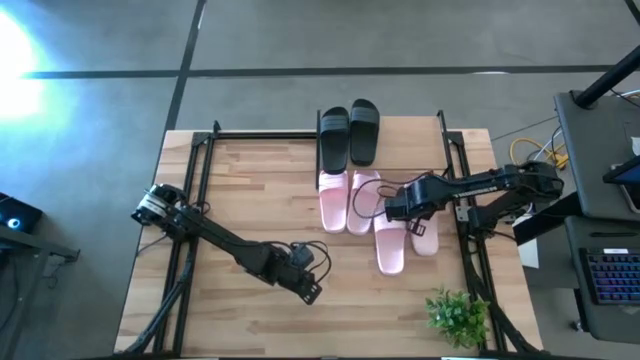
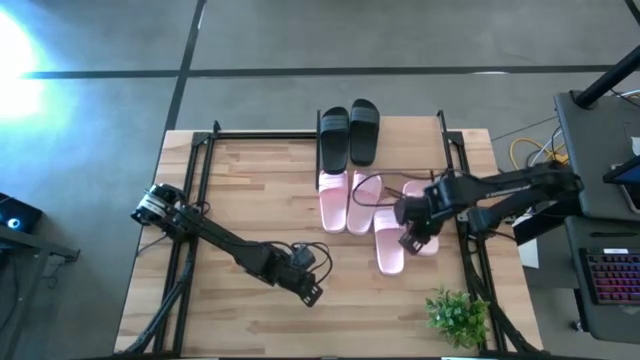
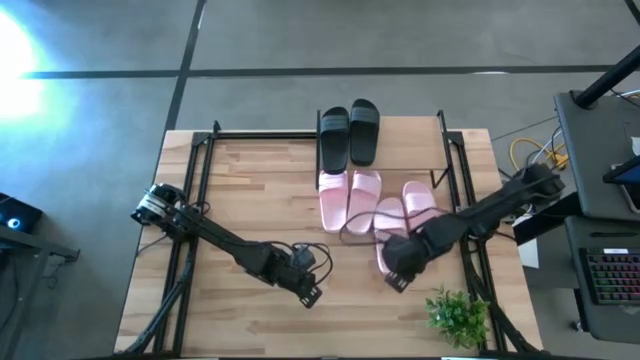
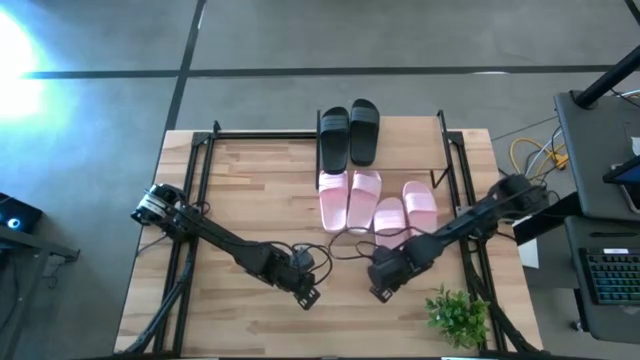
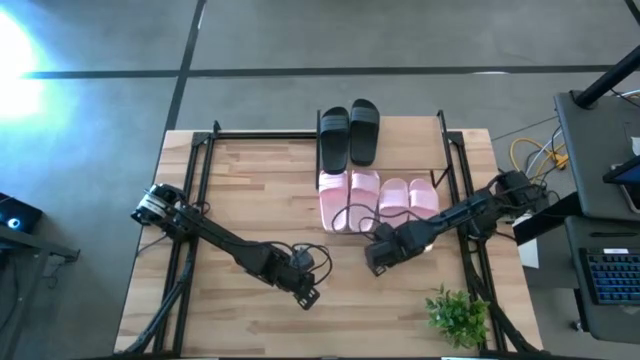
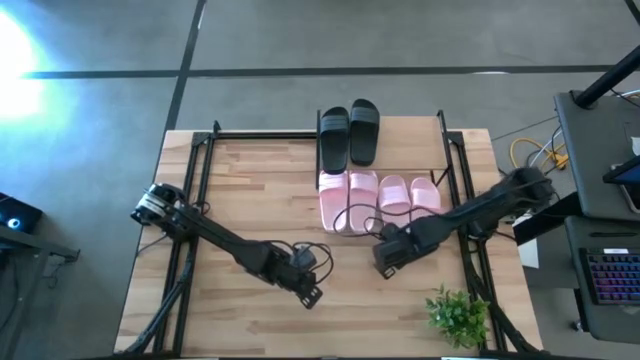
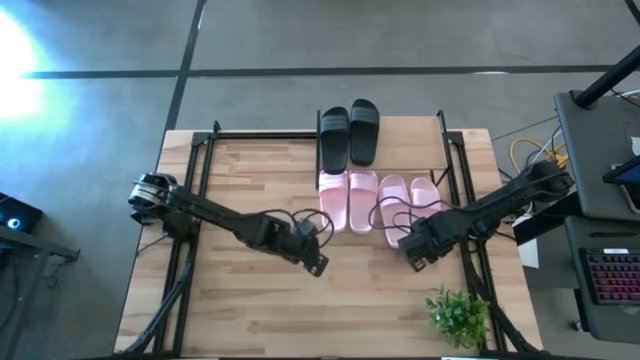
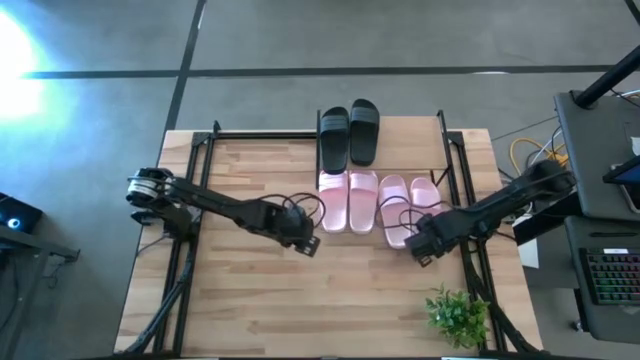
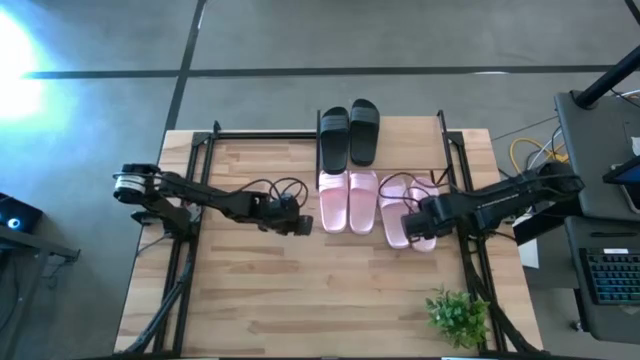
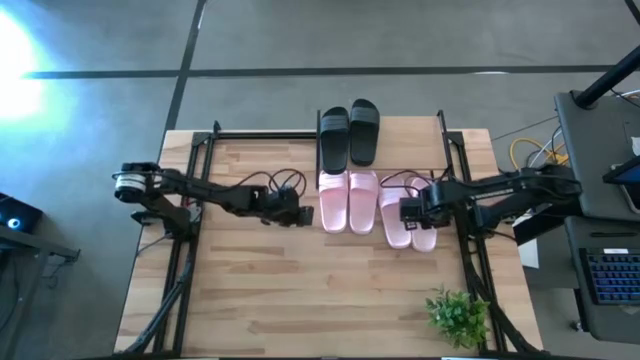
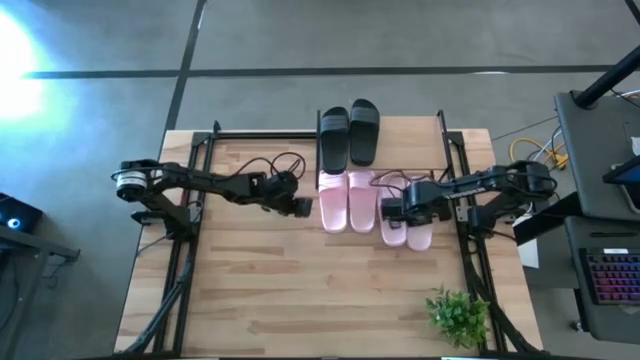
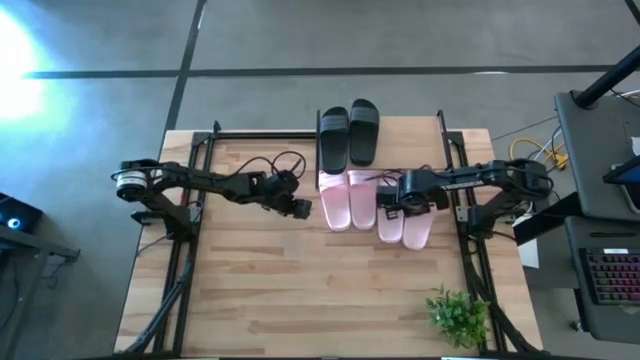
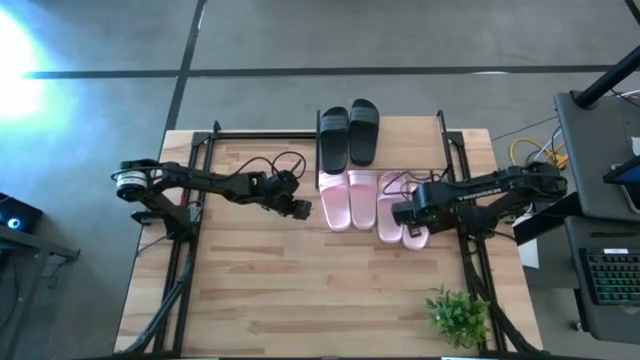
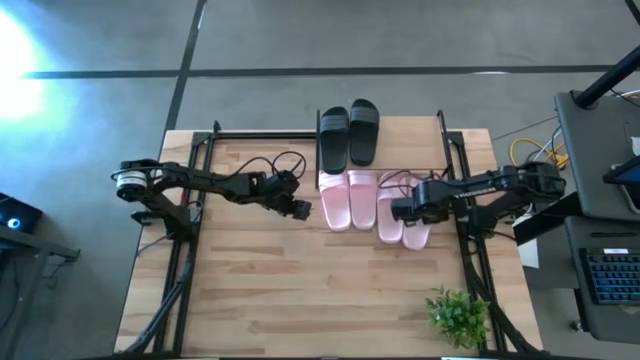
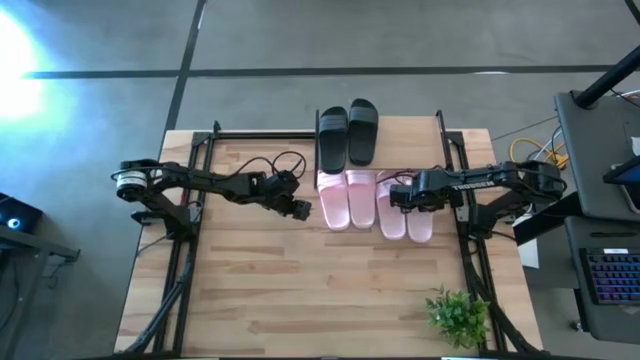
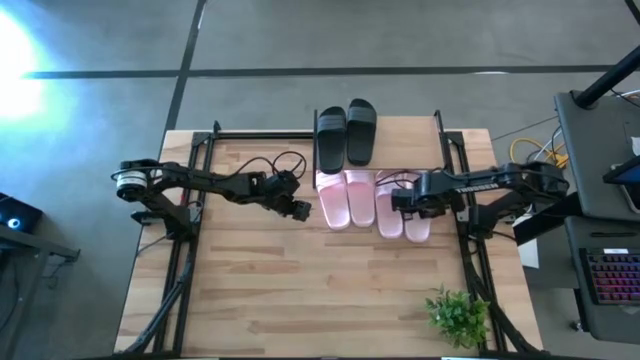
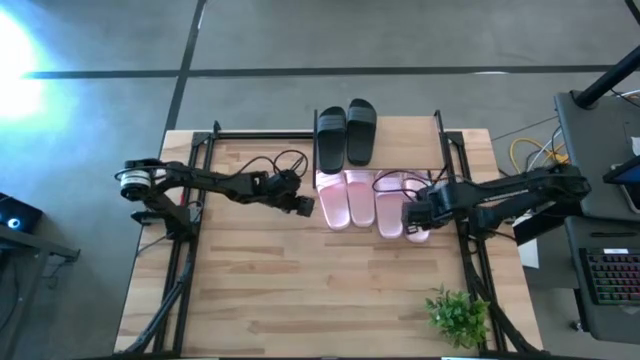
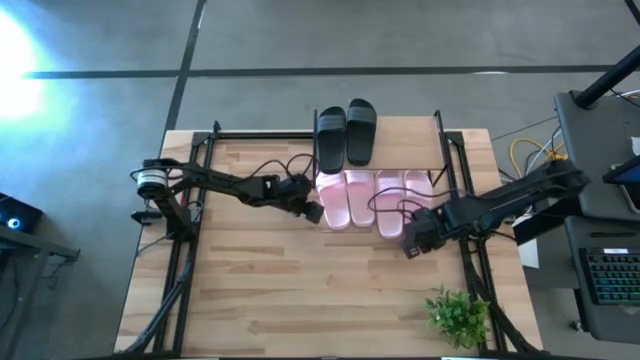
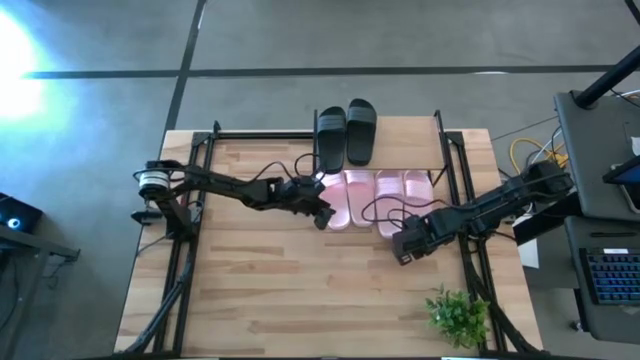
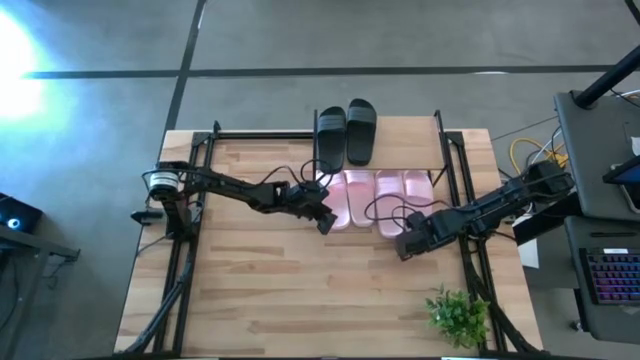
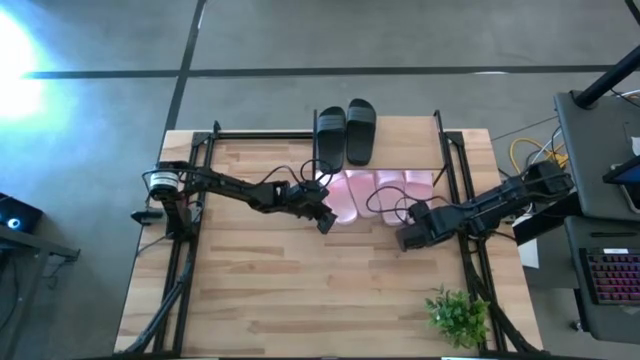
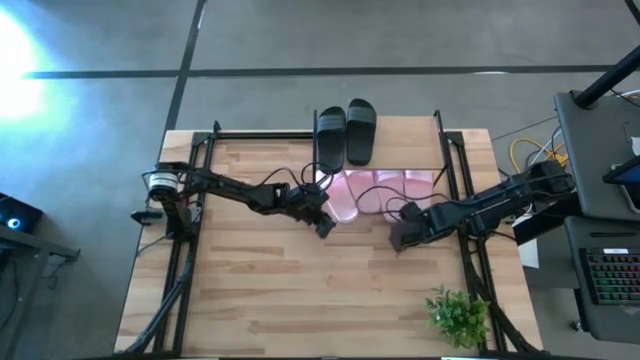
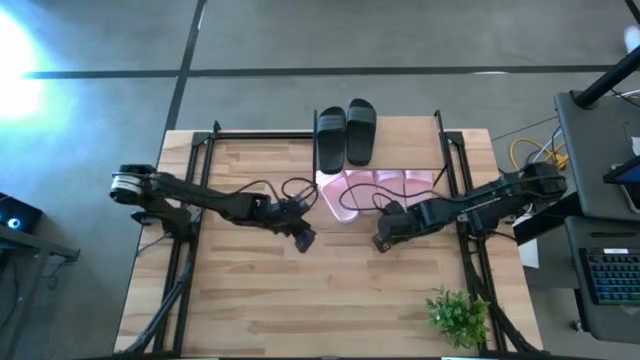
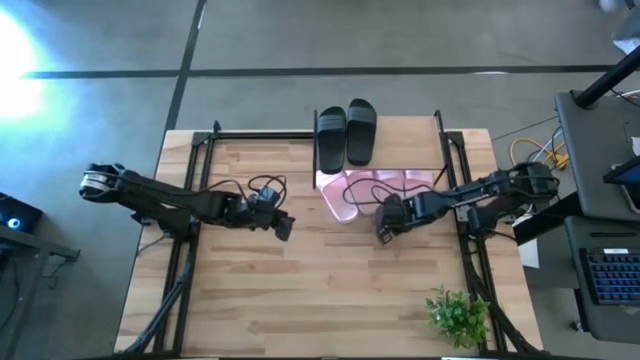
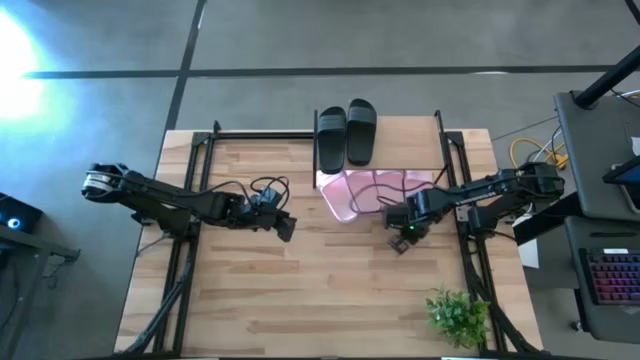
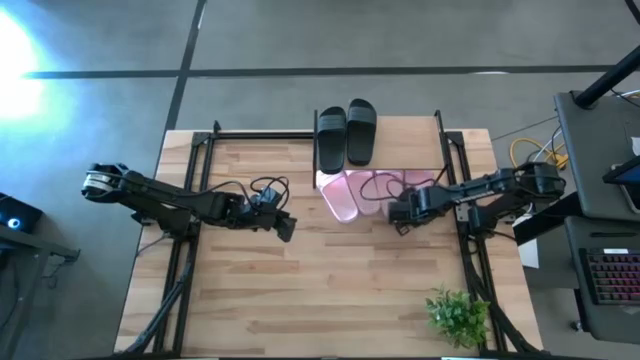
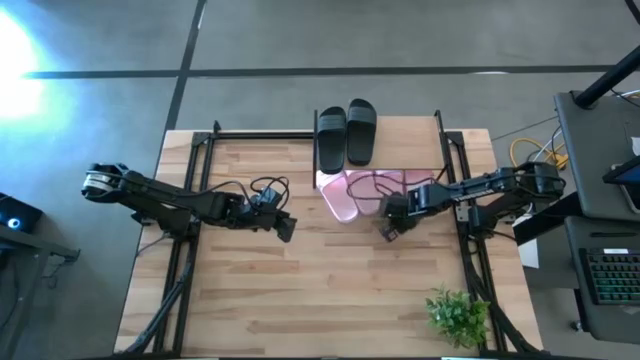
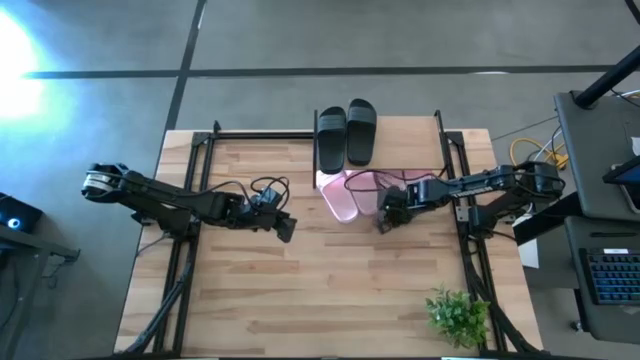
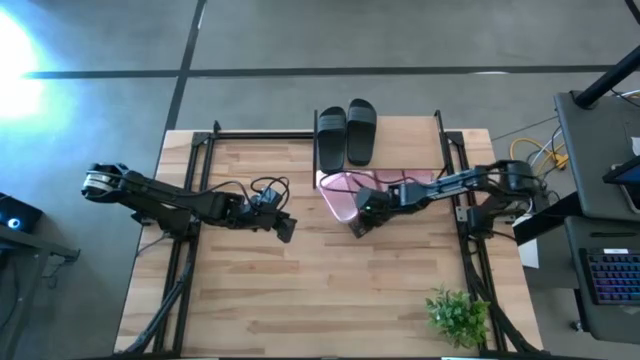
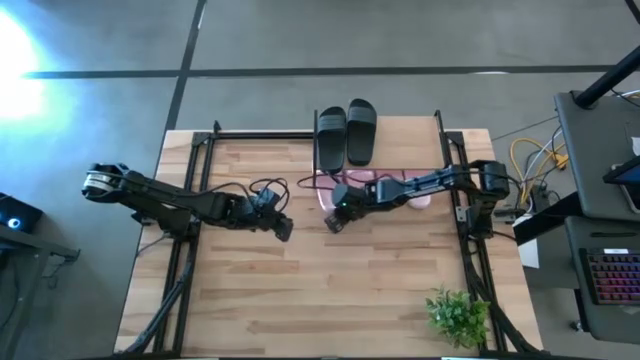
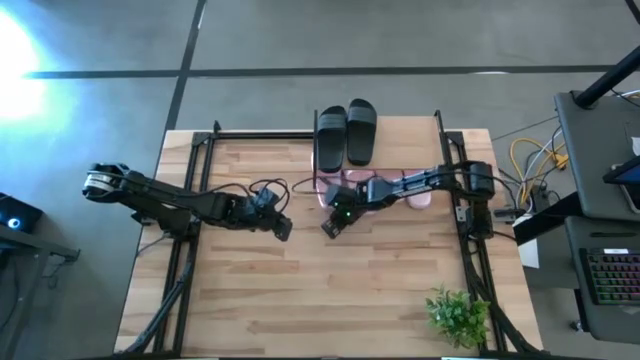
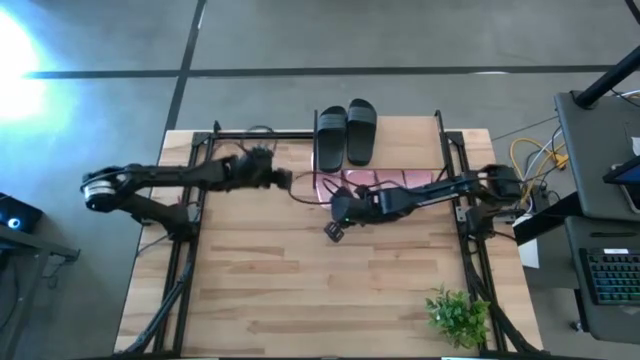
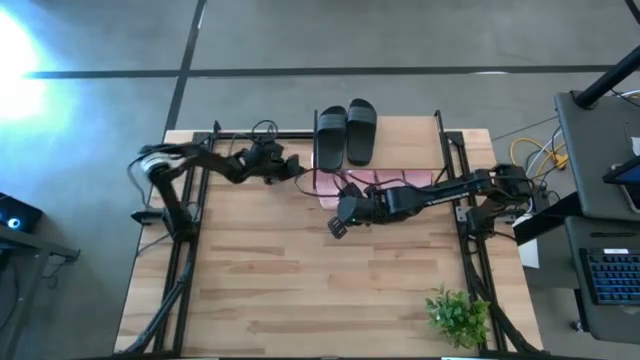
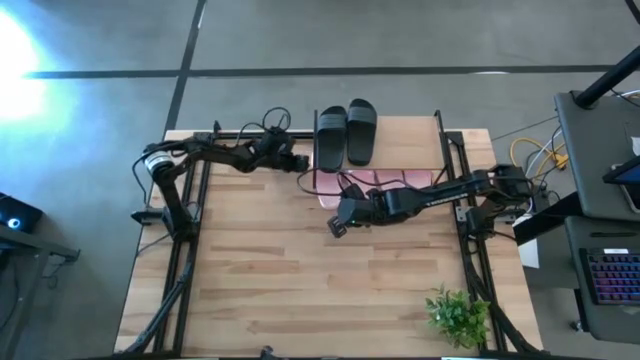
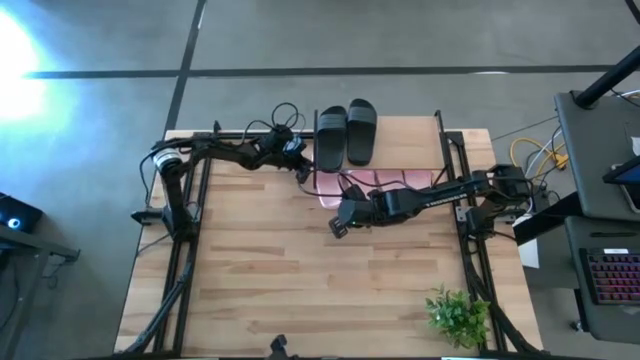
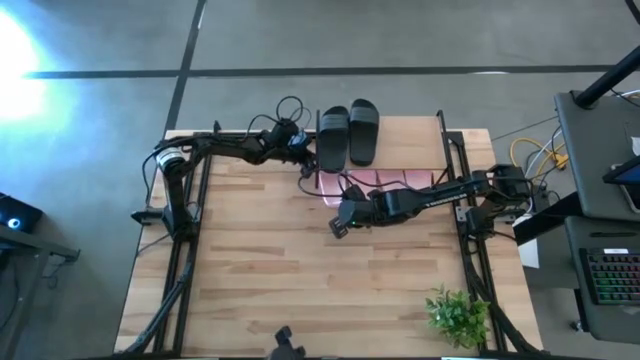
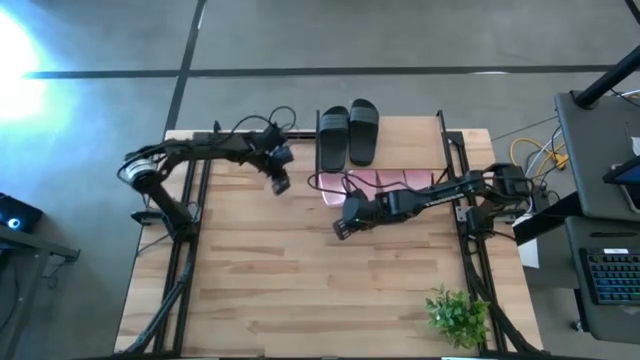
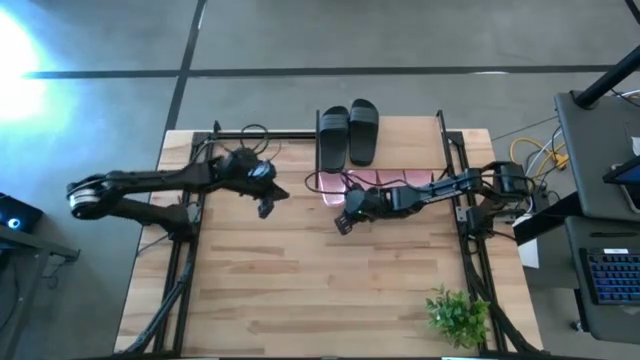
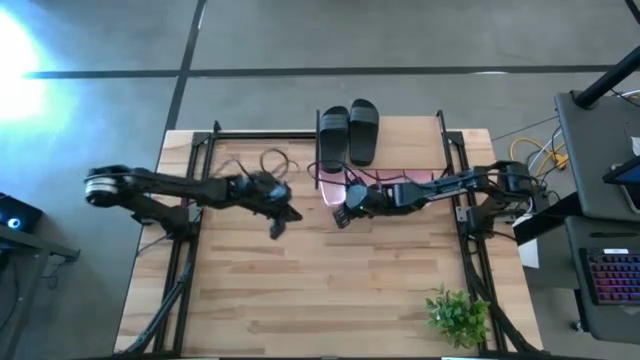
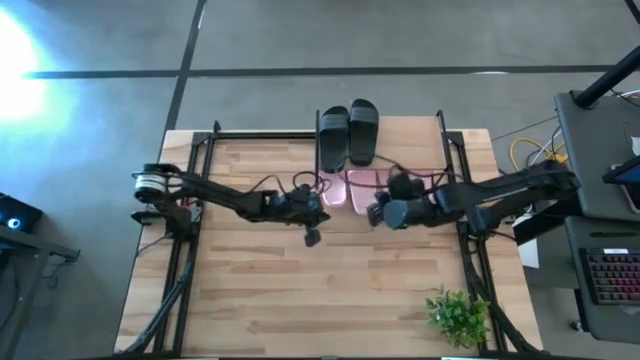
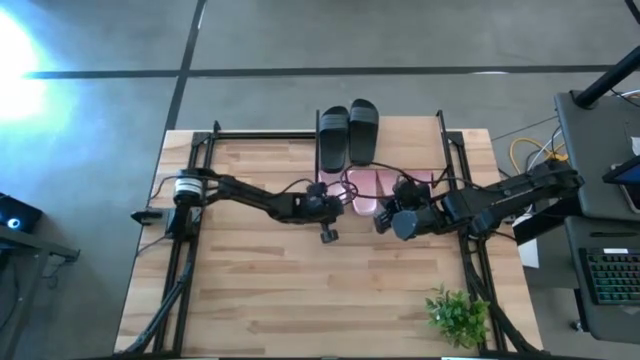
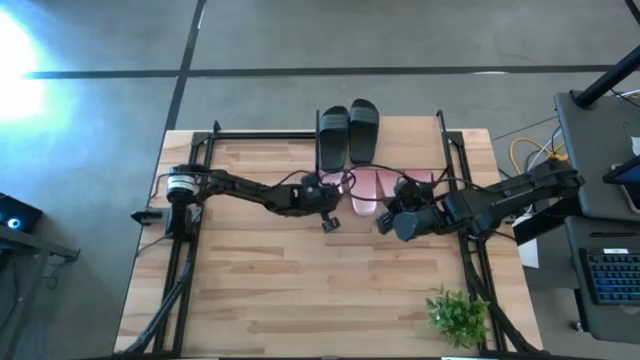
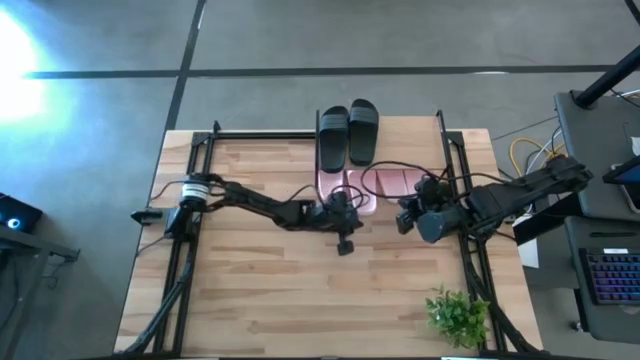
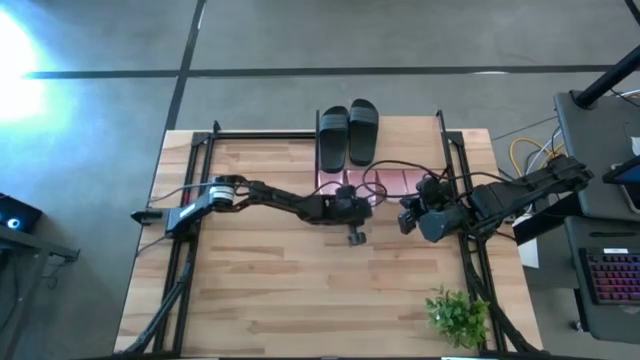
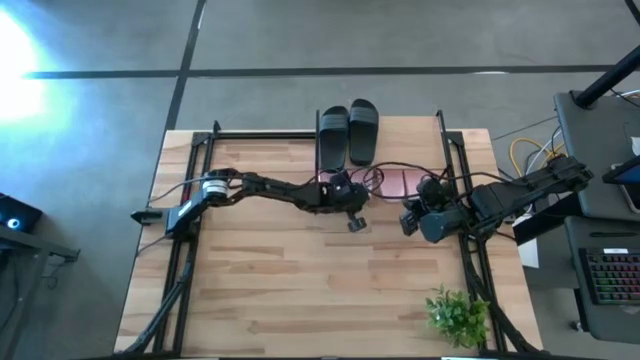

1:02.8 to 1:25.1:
Task: Pick and place slides into the shelf
Adjust the pink slides under the shelf
